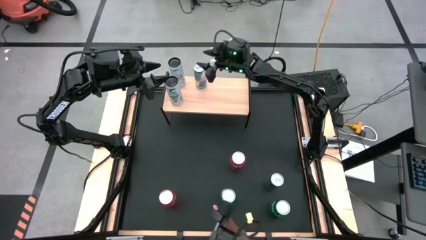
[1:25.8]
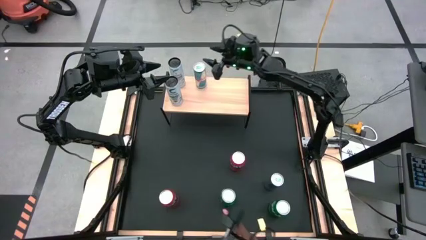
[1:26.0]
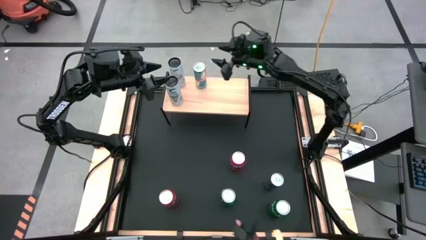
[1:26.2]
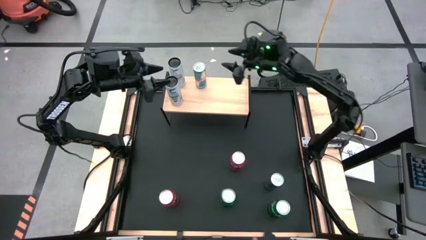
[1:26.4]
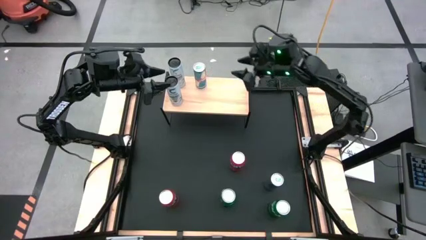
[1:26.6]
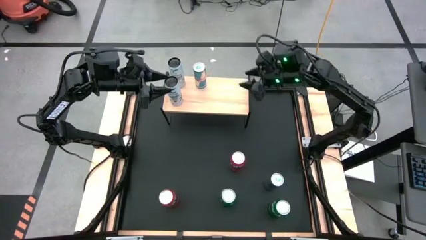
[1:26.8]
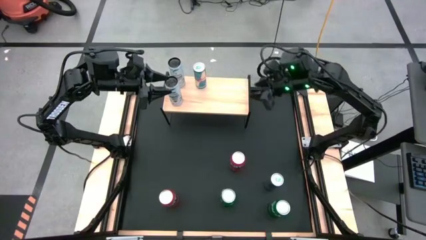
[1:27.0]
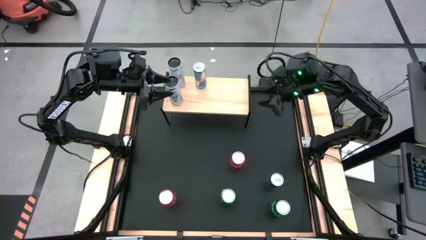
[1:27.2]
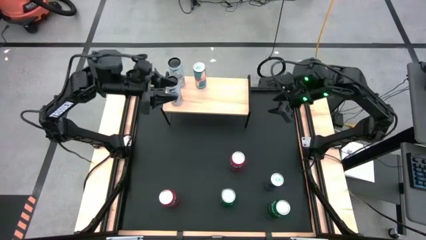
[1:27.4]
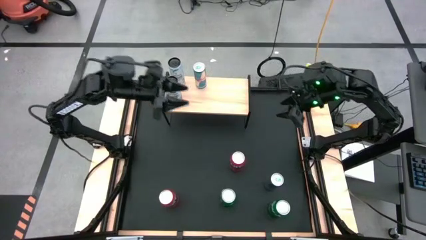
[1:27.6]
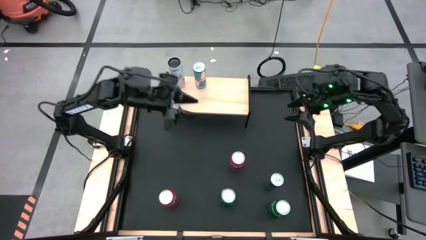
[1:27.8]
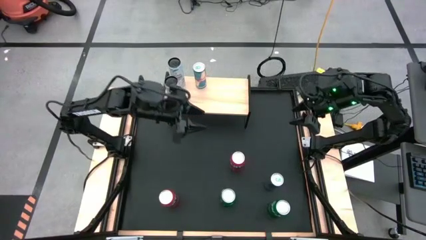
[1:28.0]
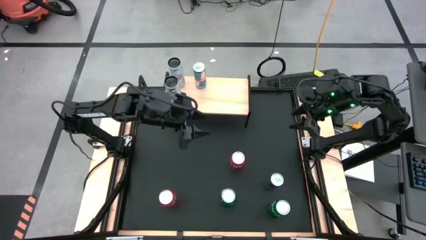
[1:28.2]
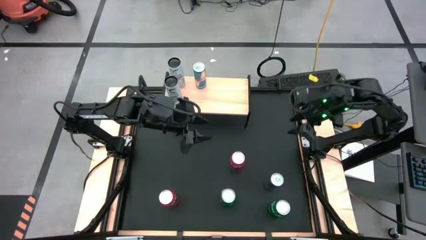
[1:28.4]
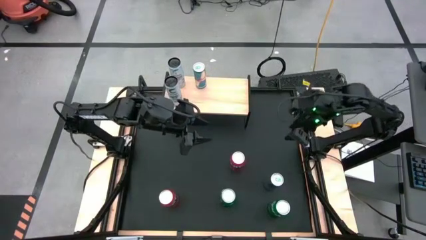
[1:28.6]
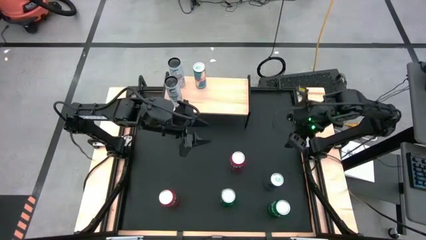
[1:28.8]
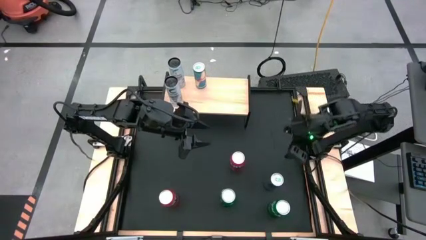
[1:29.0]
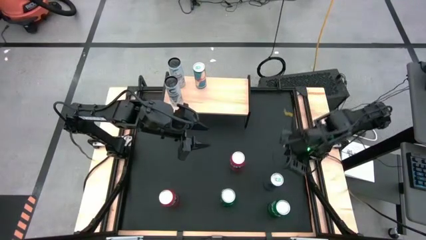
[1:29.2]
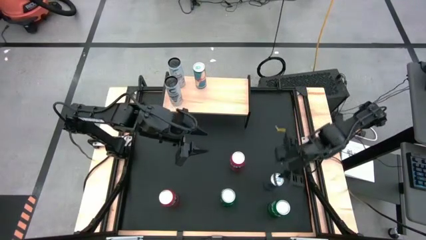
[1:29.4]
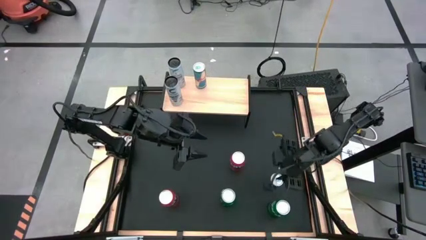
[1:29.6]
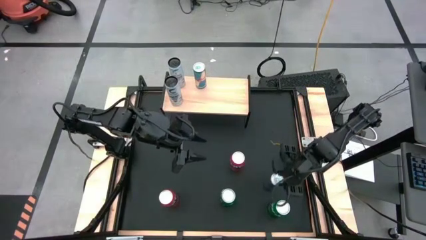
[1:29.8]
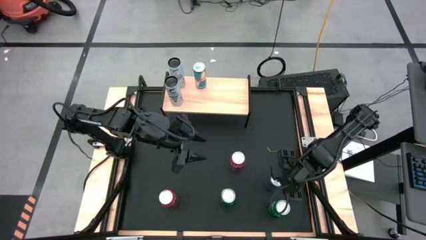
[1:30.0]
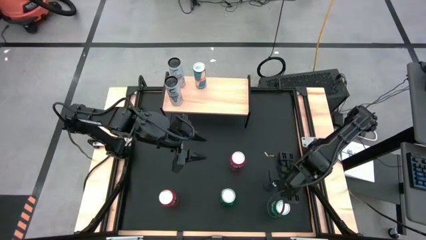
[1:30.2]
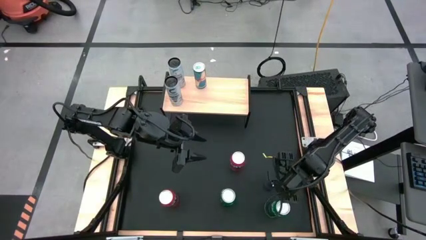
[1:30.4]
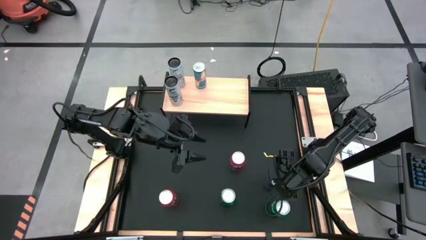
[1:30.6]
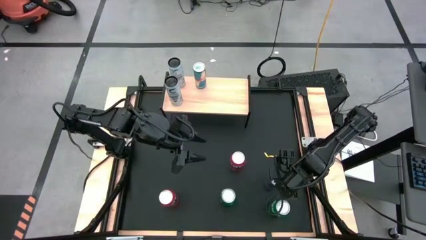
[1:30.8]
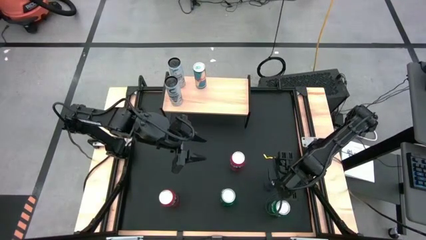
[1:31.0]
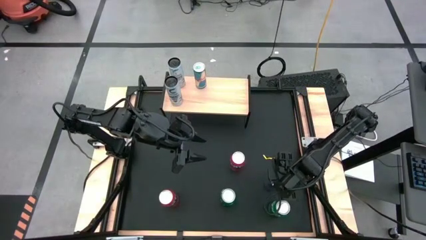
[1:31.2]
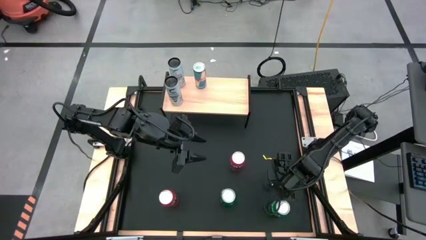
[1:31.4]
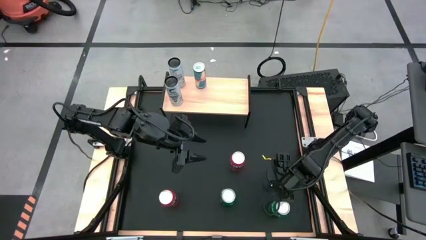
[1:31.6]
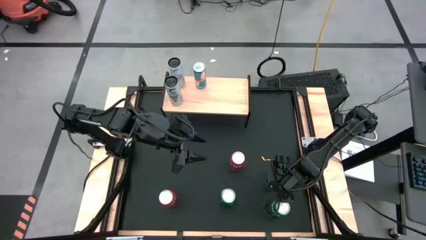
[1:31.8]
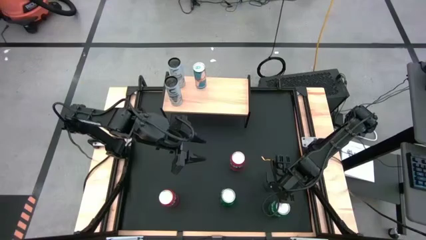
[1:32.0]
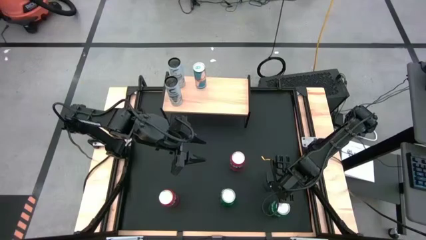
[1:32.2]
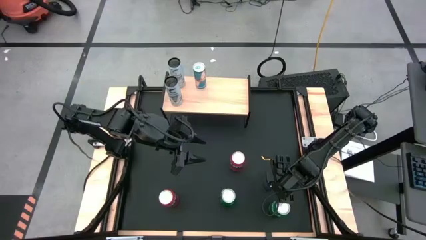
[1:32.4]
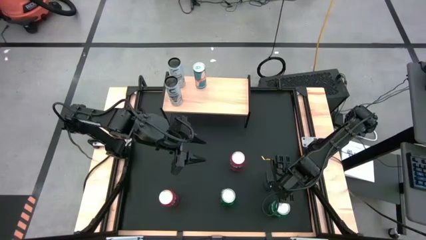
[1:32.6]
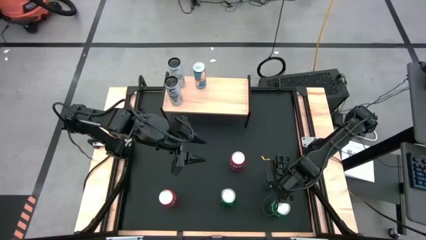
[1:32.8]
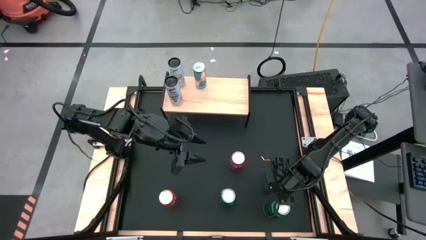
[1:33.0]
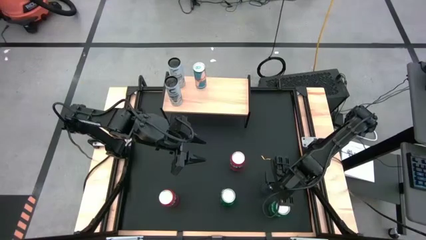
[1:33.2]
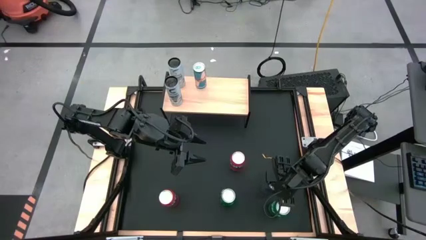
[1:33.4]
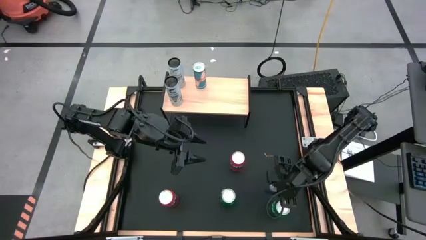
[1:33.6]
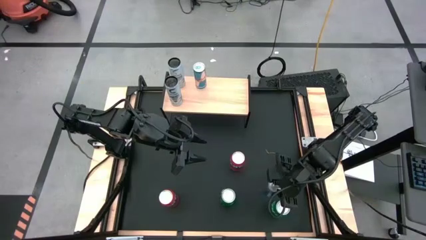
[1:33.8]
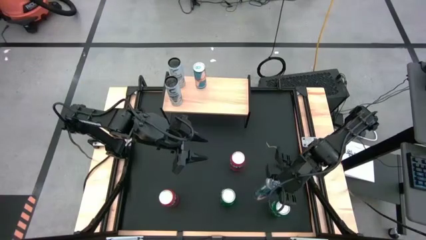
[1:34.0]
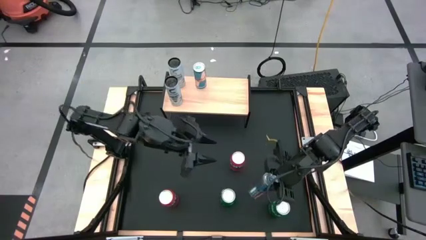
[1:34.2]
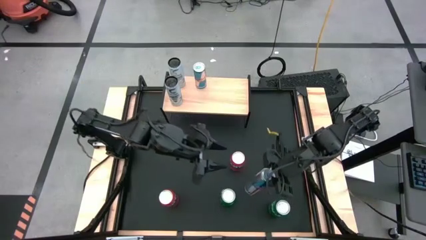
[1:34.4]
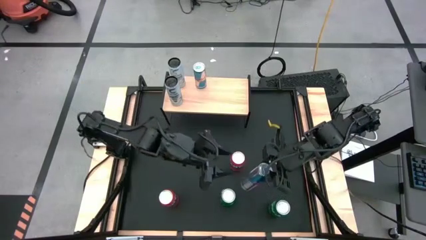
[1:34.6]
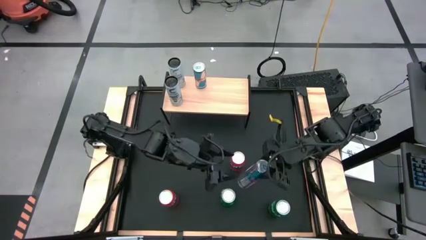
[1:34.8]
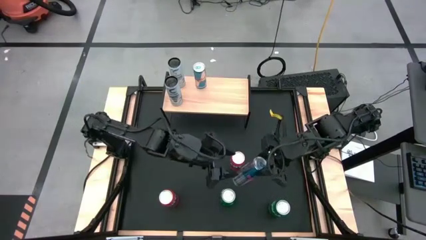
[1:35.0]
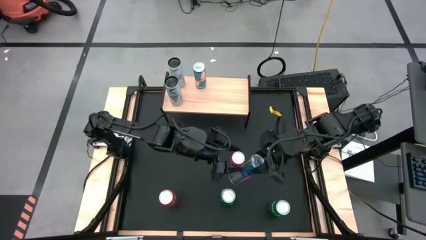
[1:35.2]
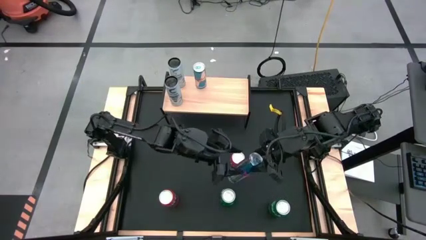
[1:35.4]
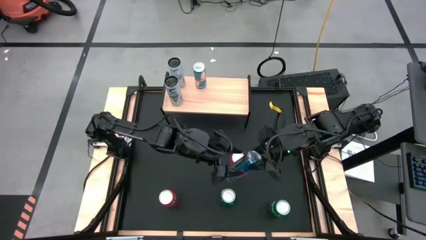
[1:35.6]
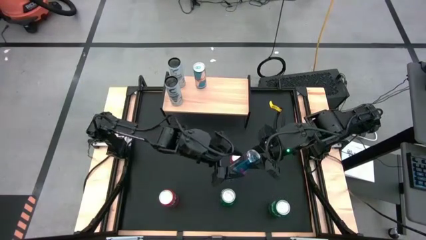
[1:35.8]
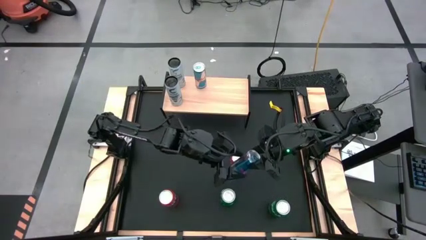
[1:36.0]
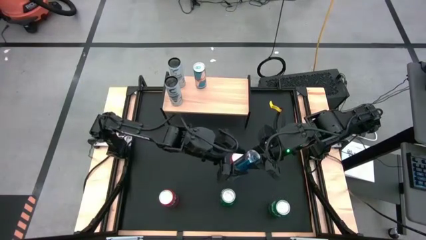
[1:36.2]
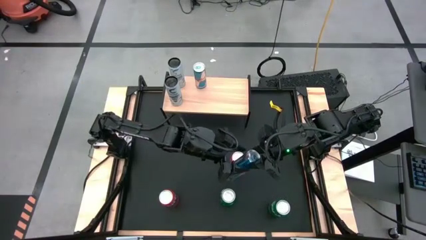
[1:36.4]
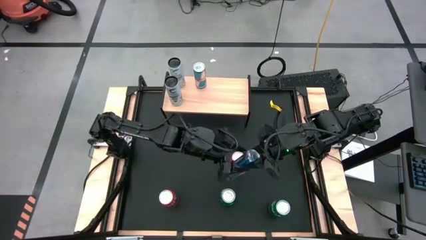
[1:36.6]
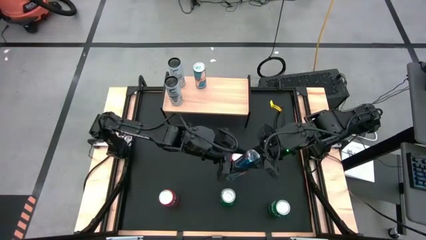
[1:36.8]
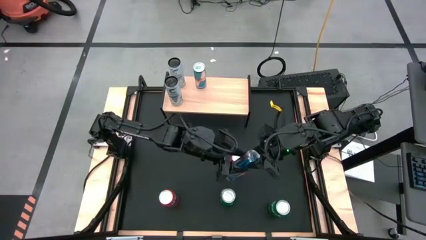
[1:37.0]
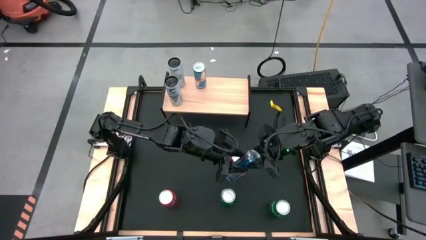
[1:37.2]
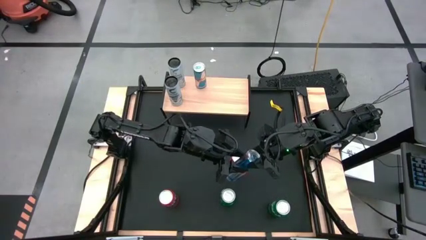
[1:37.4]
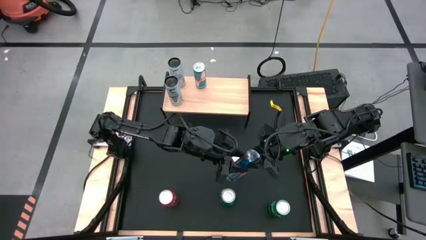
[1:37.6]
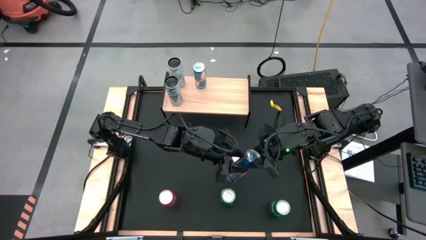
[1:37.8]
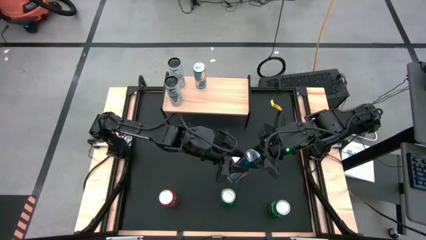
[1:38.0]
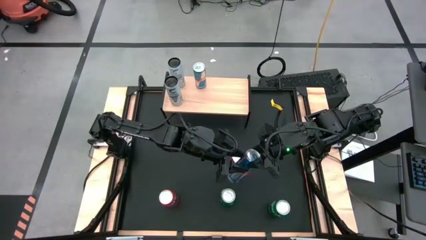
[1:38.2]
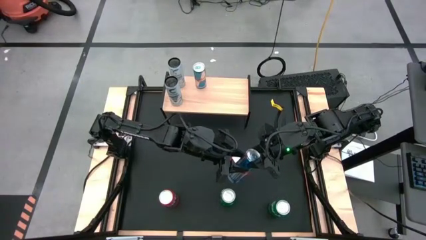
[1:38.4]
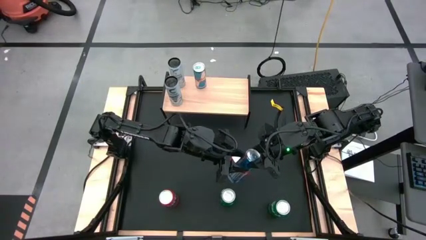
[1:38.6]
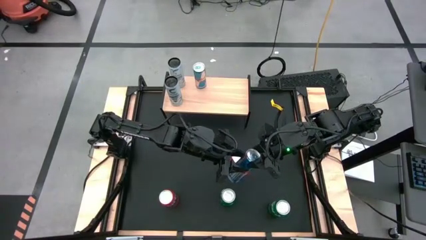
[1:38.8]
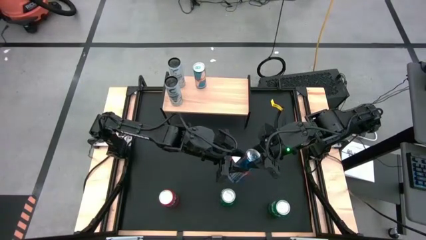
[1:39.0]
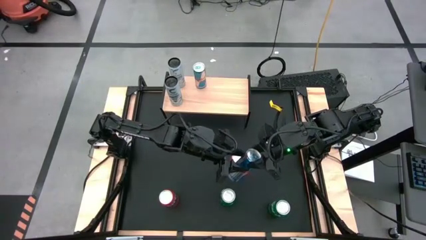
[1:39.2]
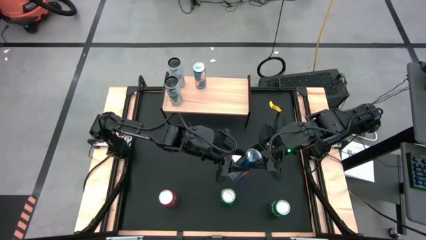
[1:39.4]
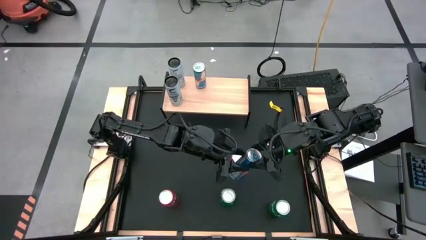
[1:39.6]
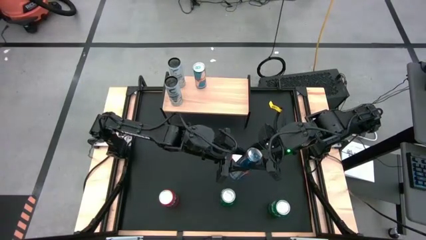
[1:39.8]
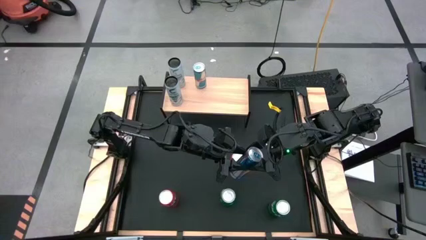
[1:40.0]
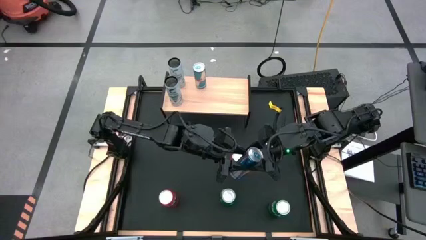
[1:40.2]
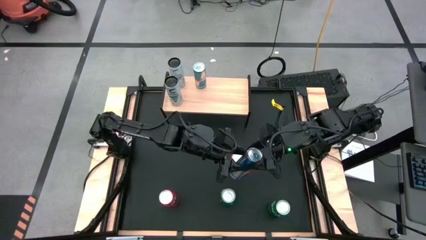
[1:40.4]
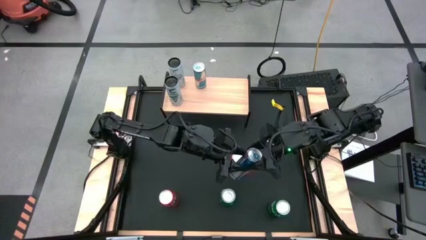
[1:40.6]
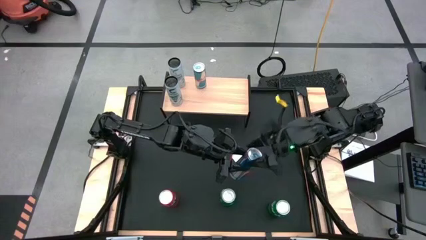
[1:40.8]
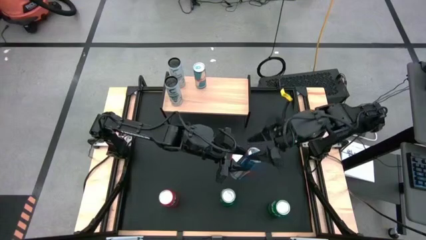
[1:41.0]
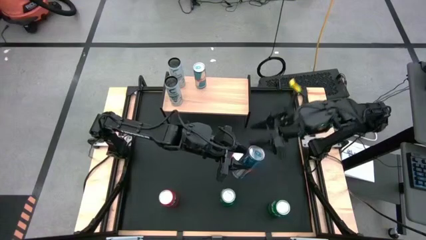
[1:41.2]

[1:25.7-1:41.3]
Task: Place canned beverage on shelf
Put the blue soda can, aligned with the other blue soda can on the shelf

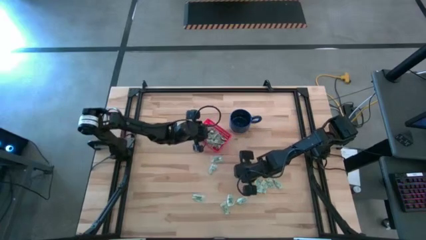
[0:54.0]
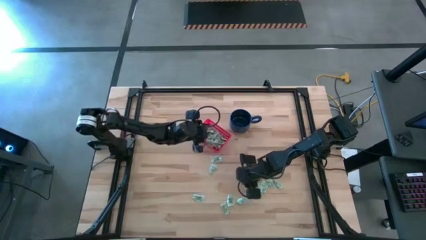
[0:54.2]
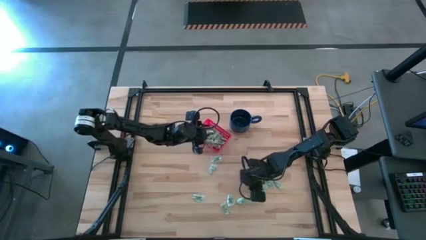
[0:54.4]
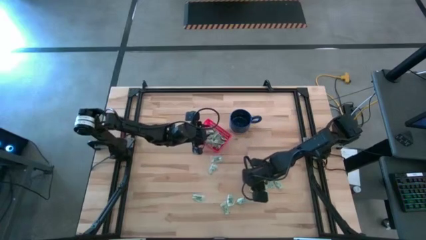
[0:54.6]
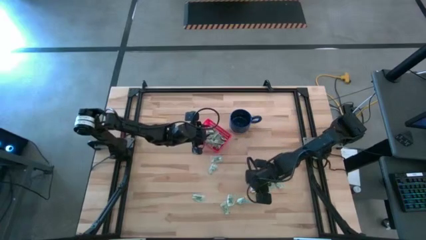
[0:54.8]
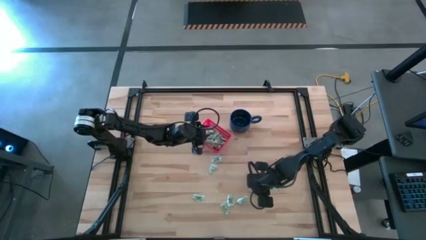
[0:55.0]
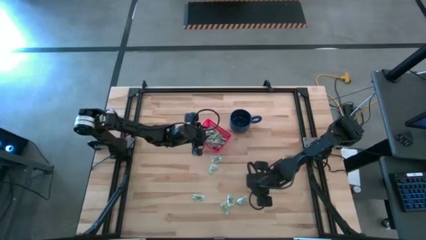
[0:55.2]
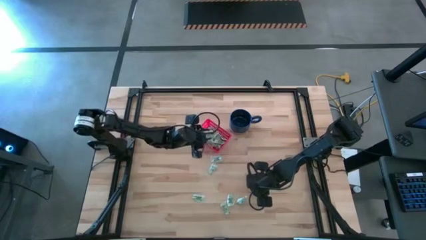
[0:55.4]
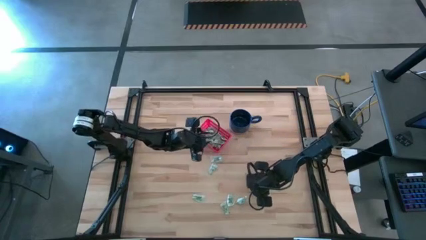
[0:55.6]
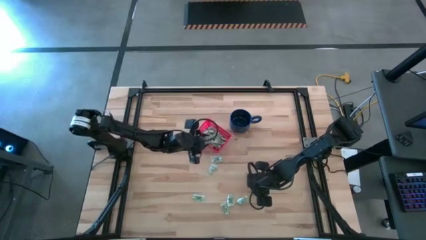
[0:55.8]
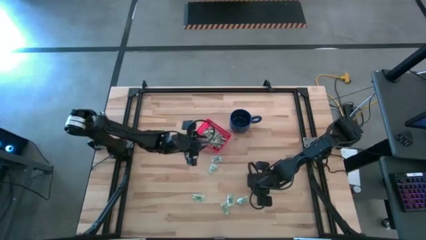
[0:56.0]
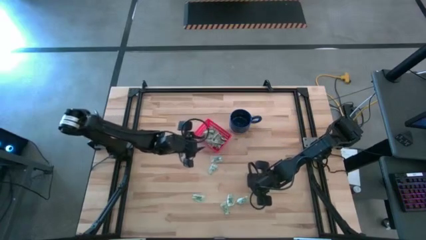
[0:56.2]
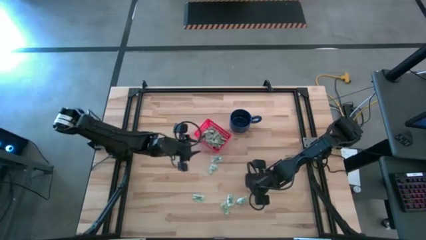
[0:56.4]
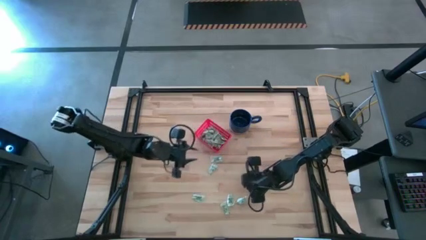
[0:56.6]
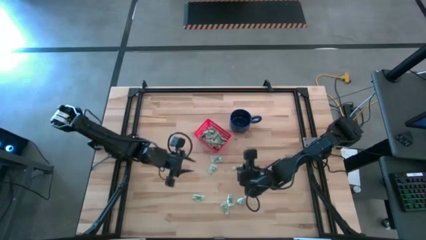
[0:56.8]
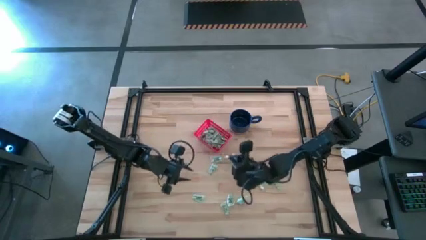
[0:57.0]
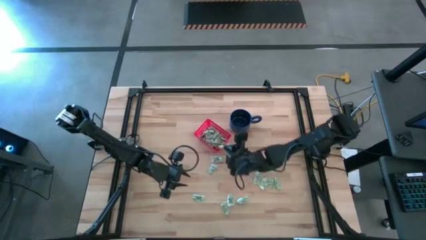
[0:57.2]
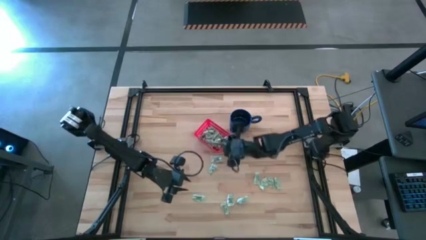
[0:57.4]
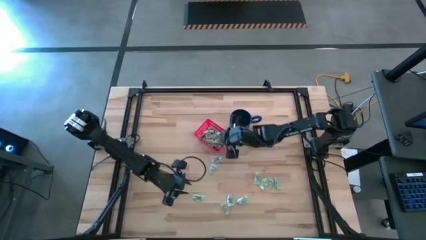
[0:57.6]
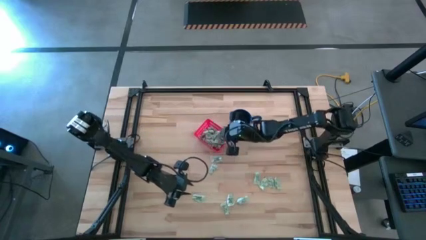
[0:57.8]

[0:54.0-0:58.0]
Task: Pick and place items into bin
Put the stevia packet into the bin
